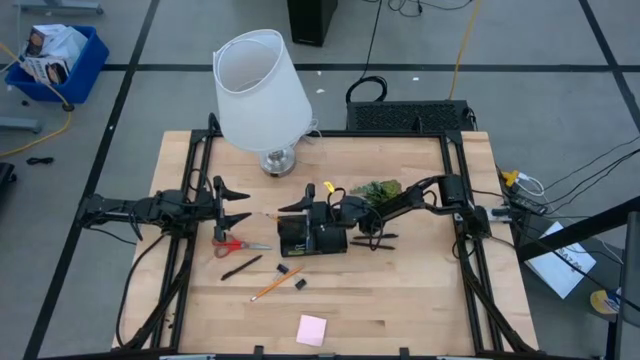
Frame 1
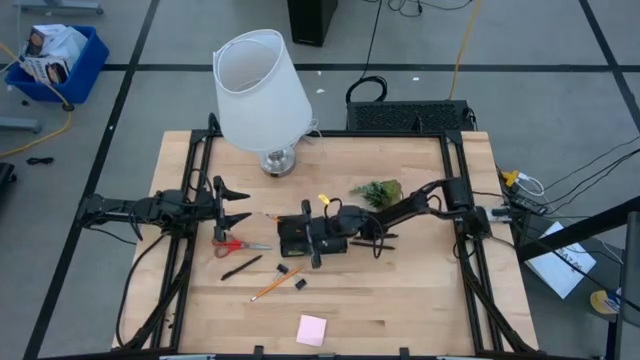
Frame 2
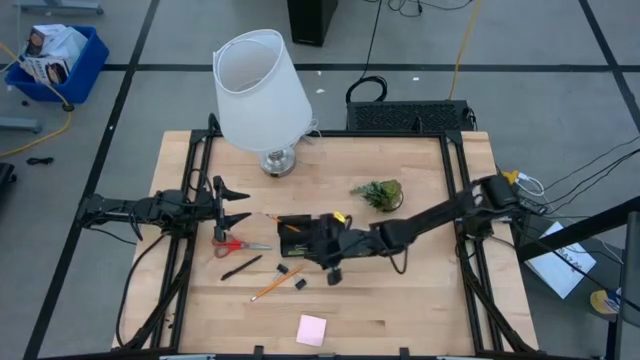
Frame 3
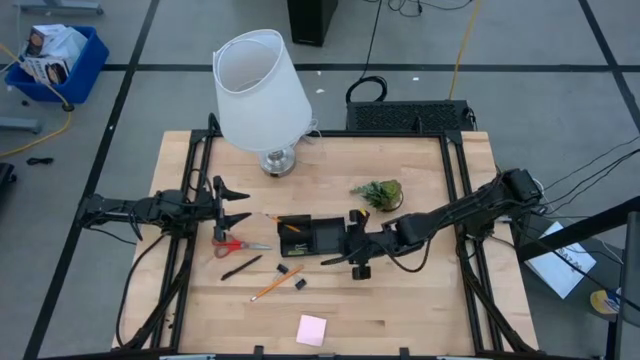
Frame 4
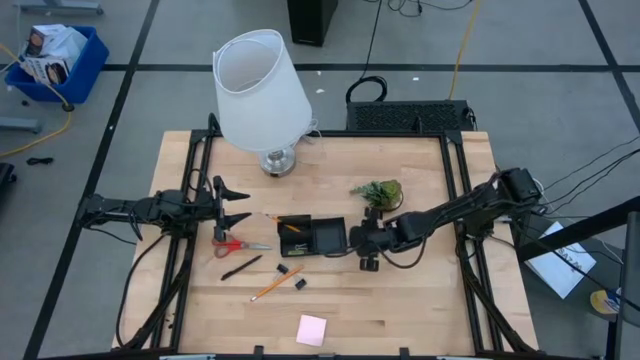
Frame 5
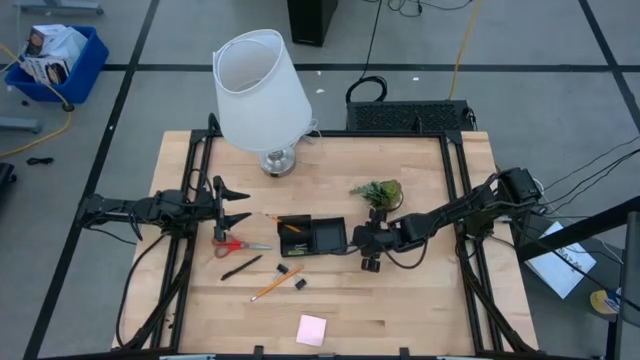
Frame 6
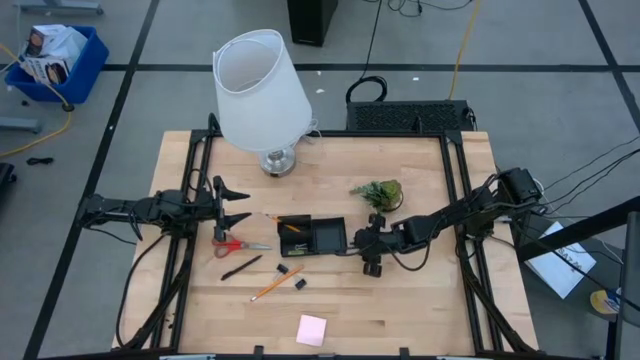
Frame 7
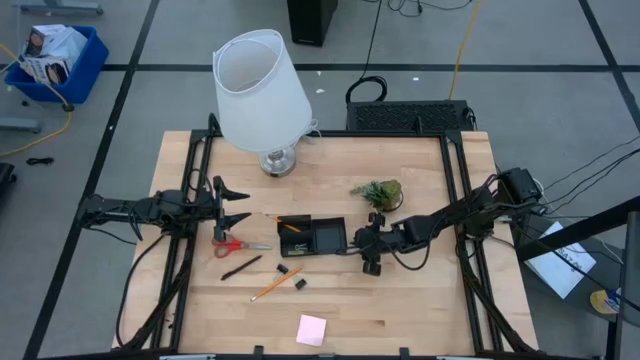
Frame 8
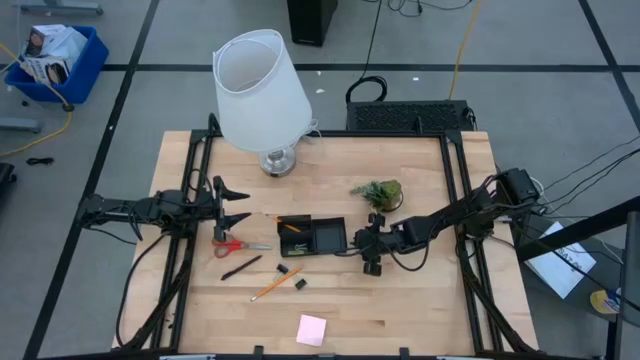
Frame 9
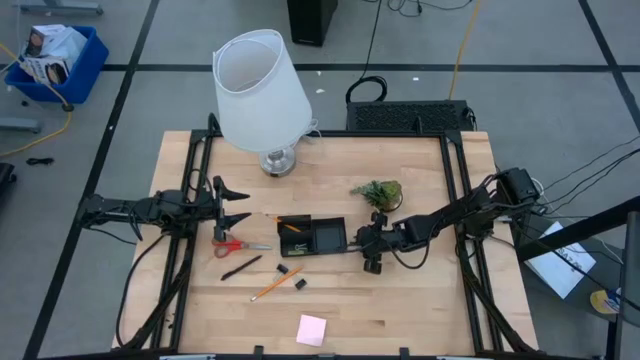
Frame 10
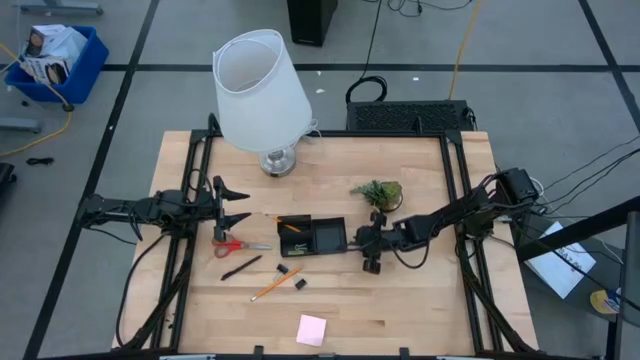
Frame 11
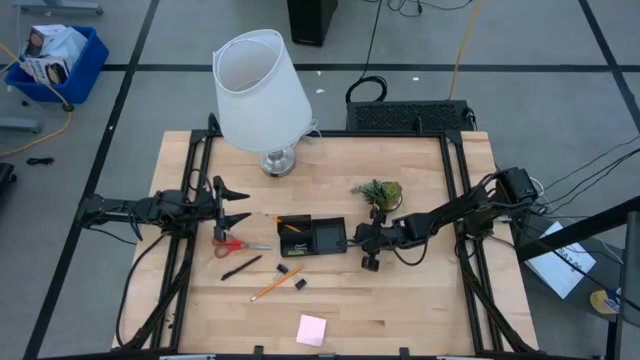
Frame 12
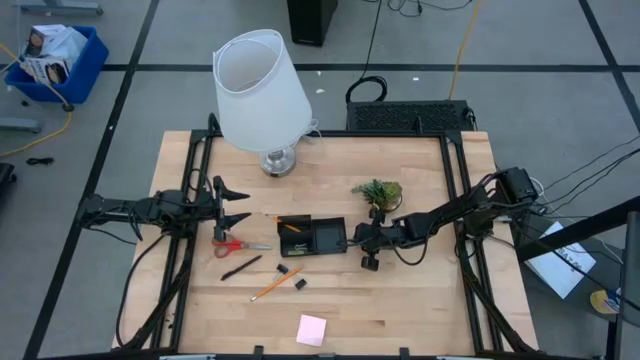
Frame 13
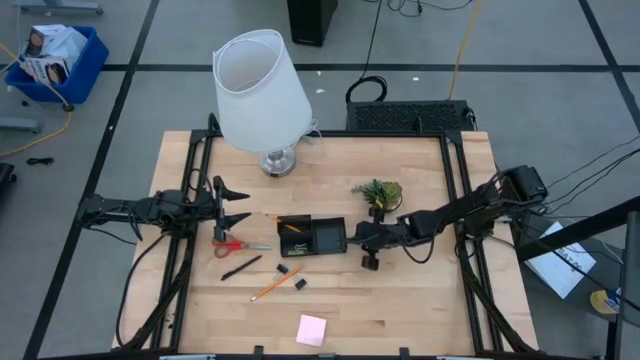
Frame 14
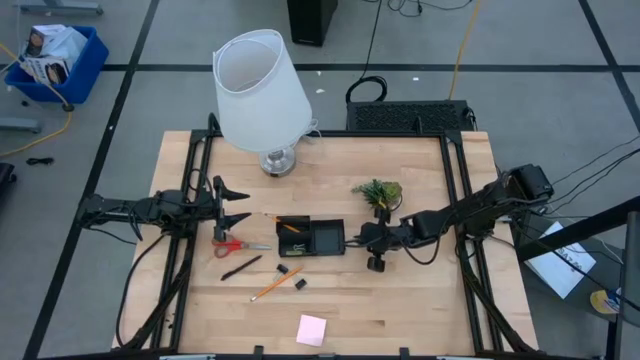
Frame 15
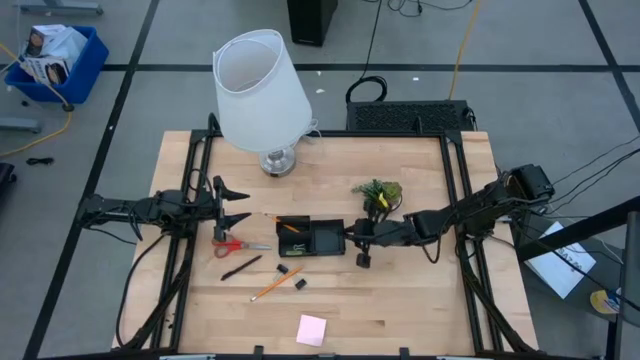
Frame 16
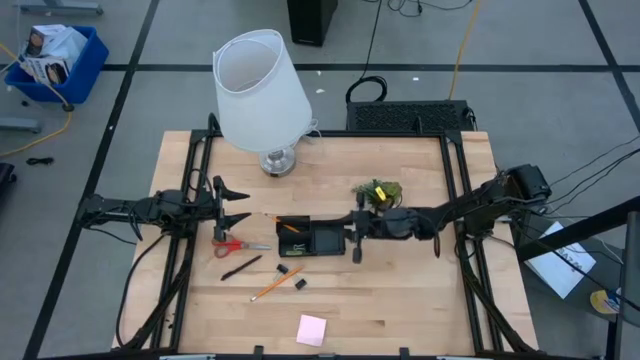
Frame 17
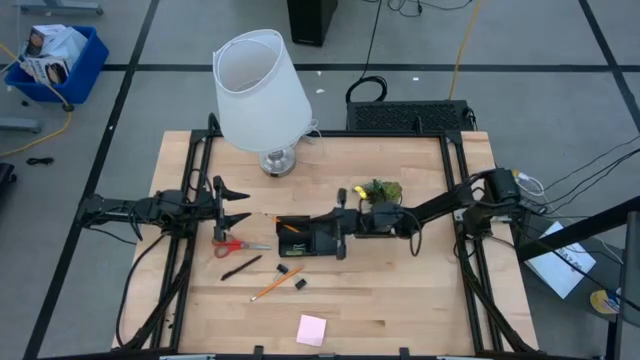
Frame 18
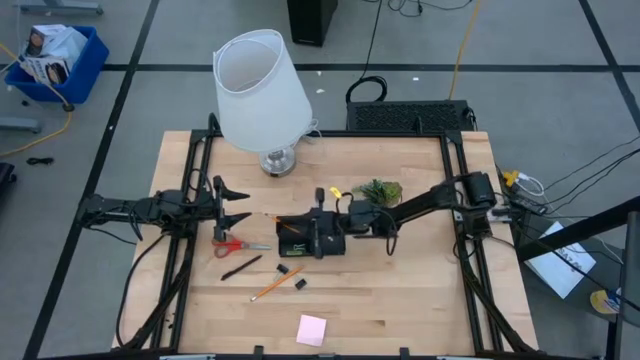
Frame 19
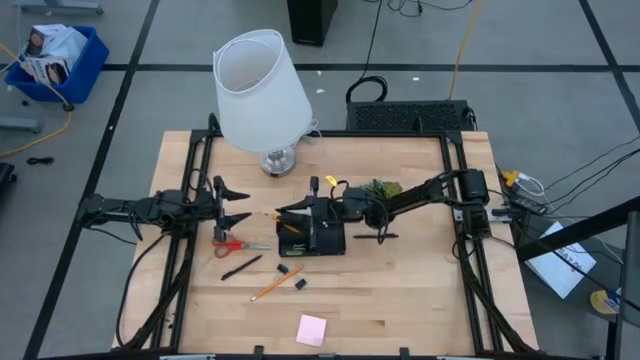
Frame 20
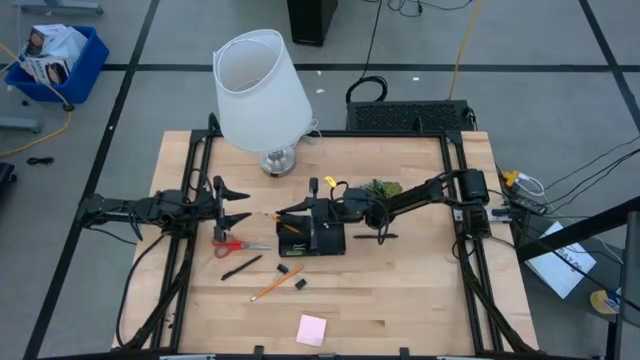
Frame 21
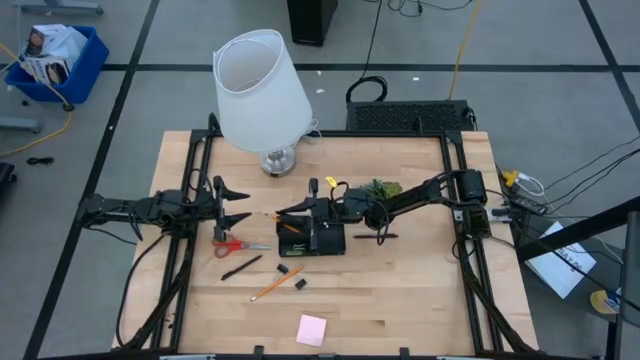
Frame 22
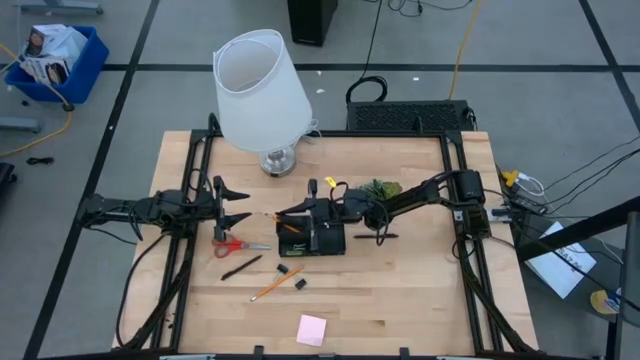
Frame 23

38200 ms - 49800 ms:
Task: Pick and place office supplies into organizer
Put the bottom right black pen into the black desk organizer

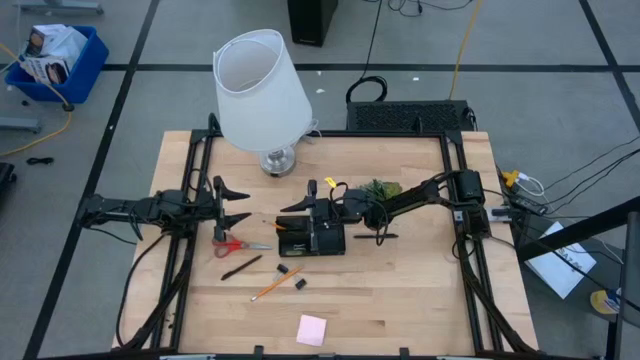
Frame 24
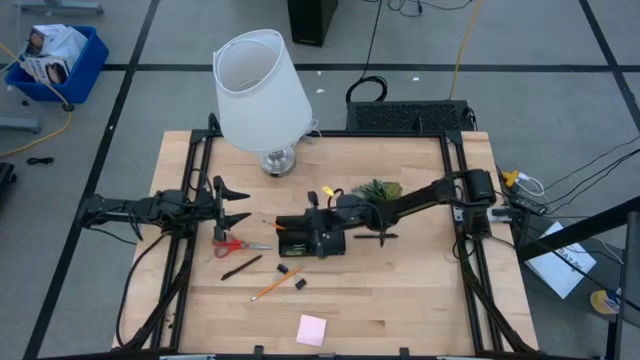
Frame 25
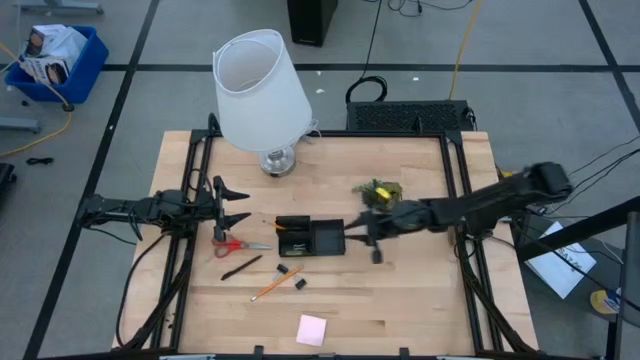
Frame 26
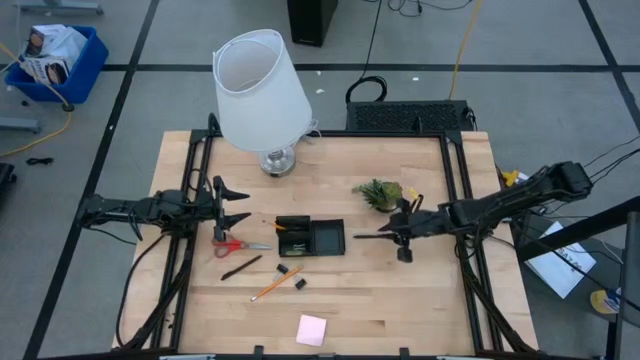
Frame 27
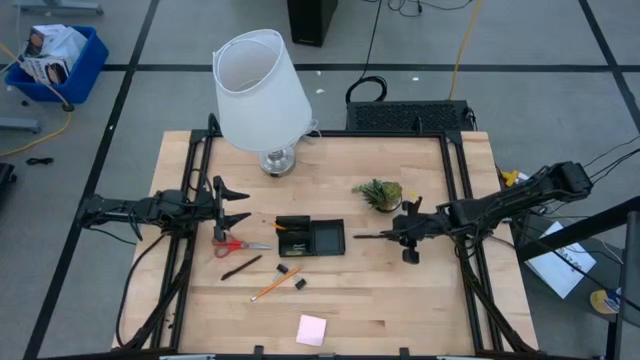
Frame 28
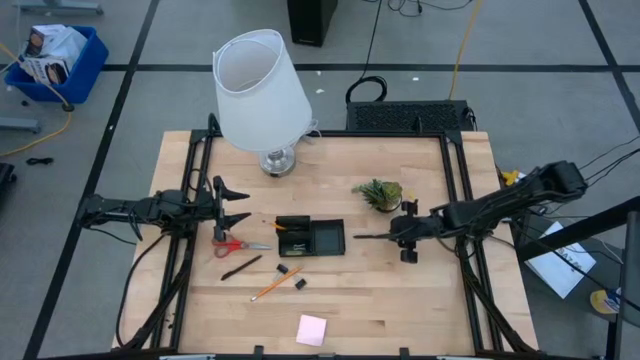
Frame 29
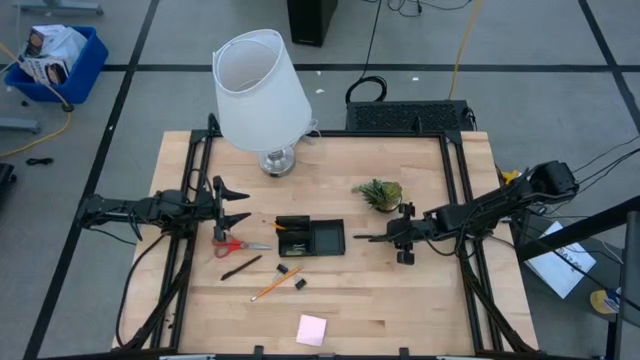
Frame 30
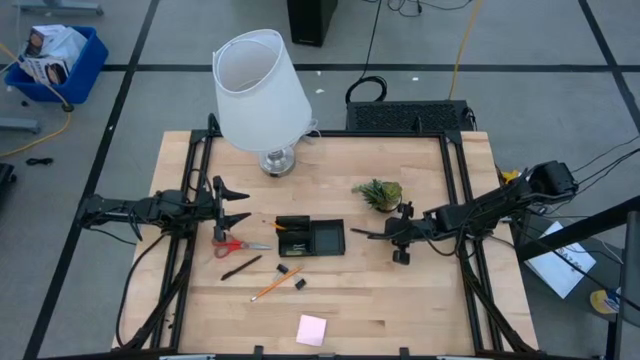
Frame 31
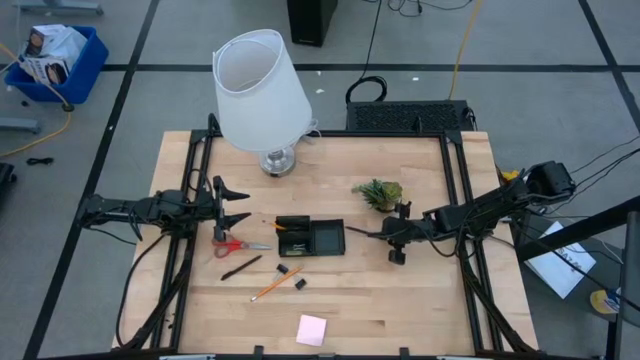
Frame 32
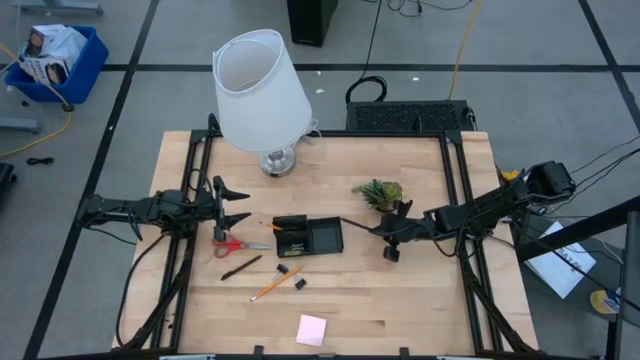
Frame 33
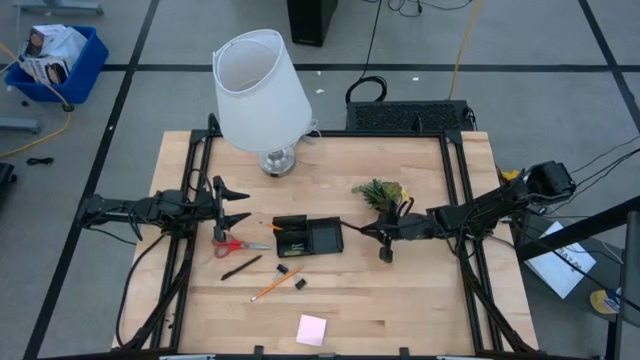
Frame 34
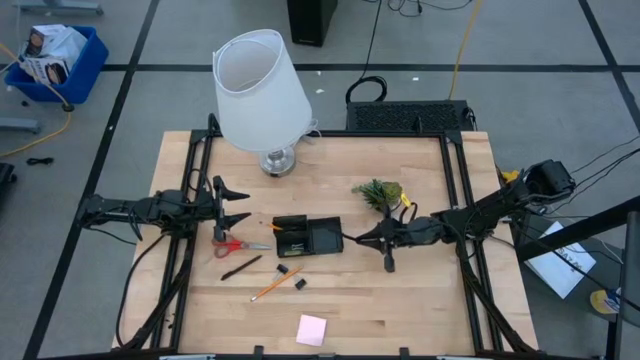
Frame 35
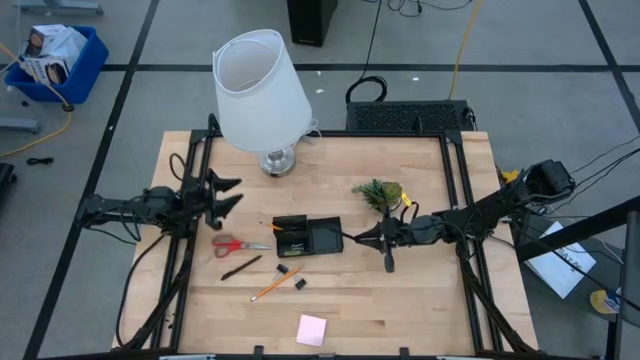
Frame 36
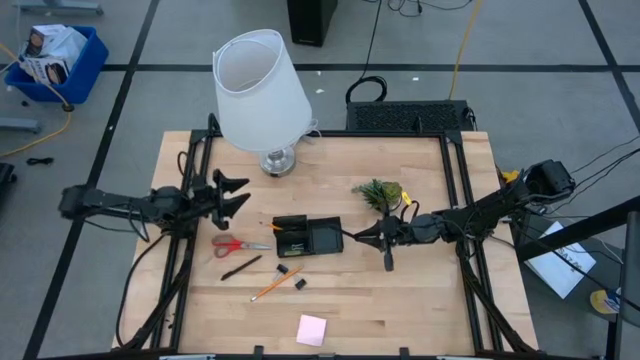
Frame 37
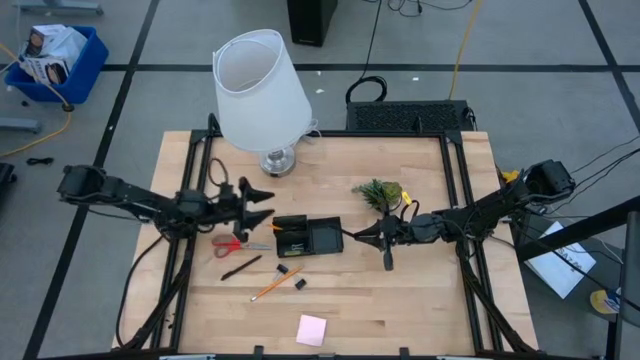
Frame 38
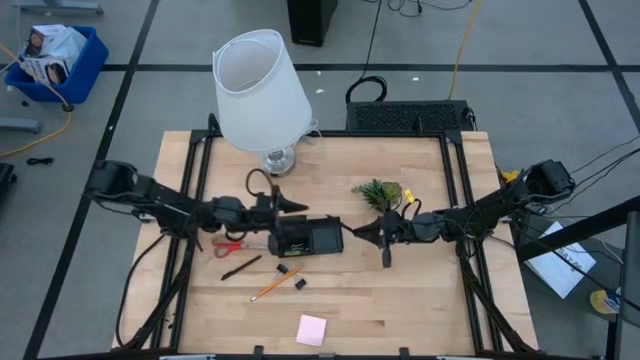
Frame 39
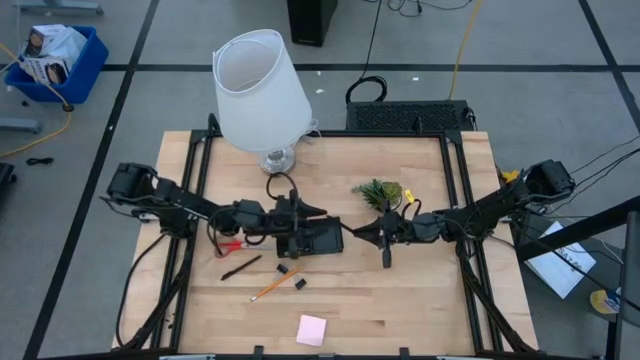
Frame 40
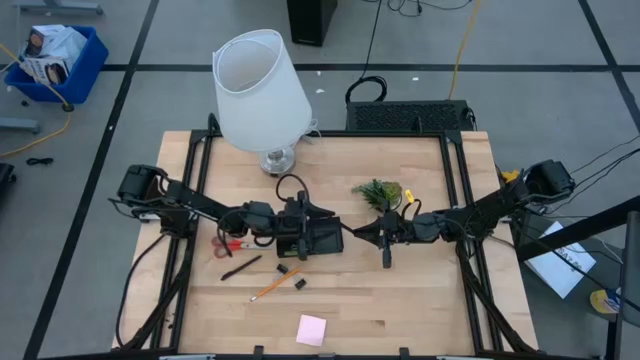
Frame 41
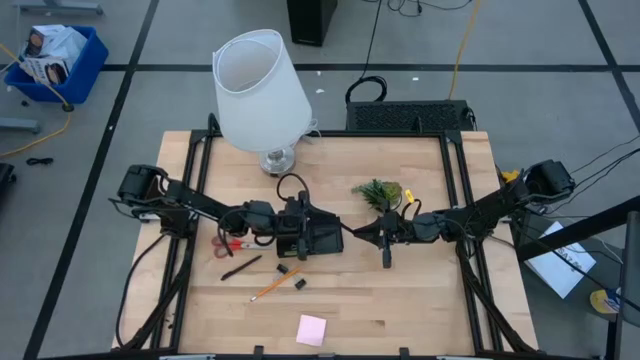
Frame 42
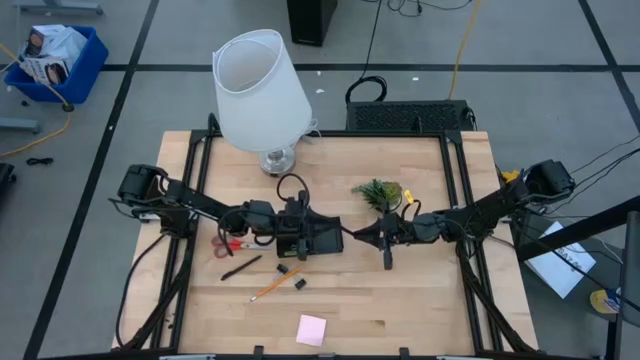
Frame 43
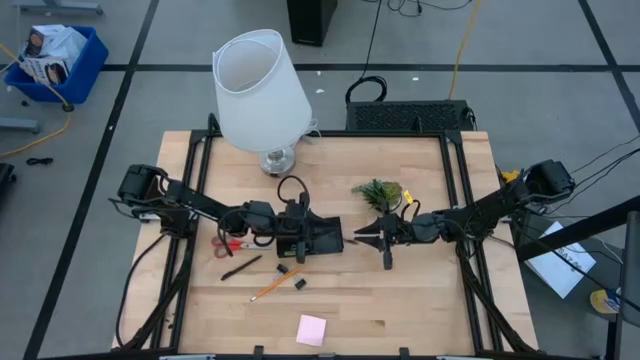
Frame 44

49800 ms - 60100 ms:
Put the right black pen into the black desk organizer
